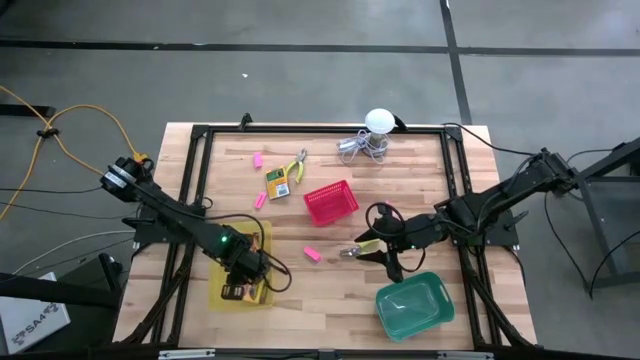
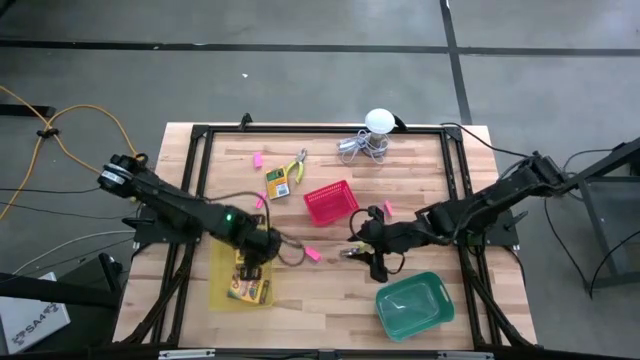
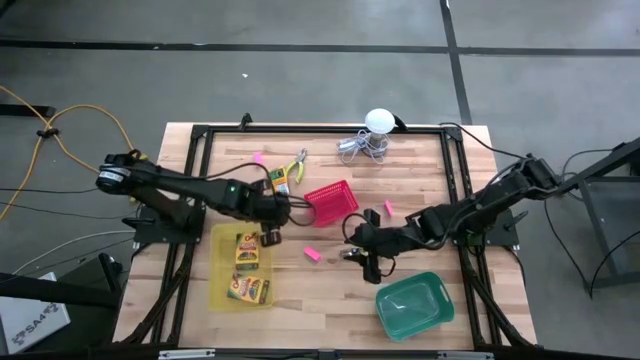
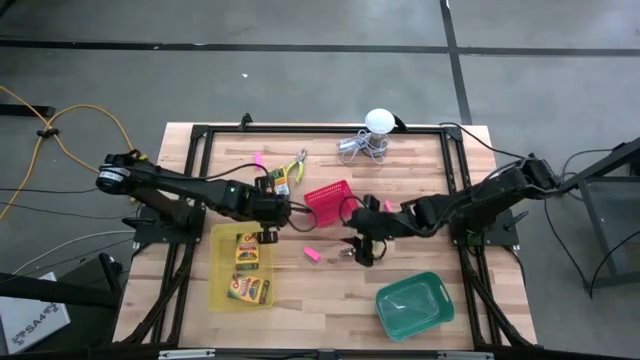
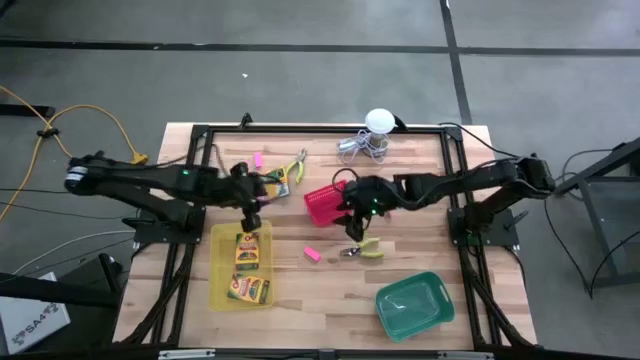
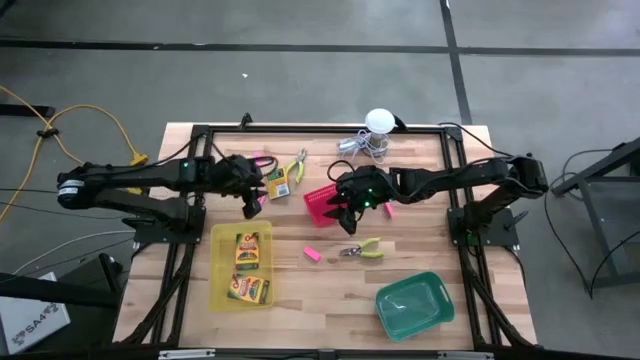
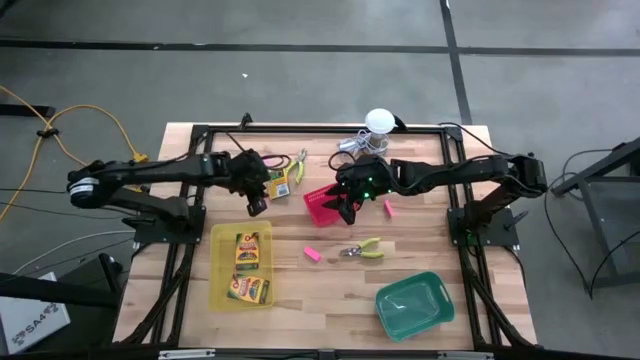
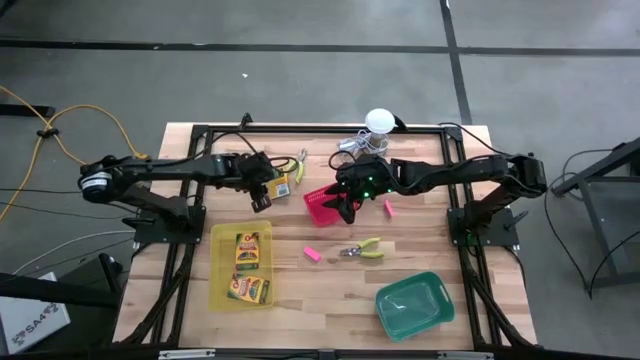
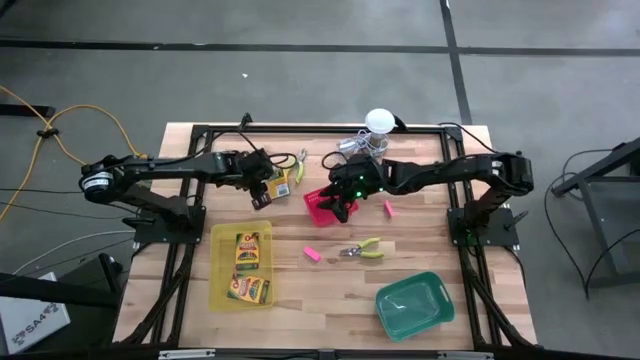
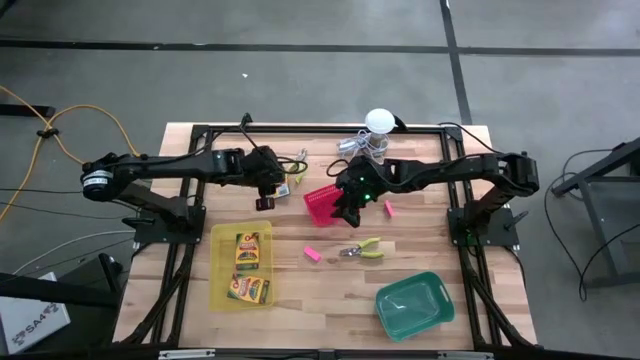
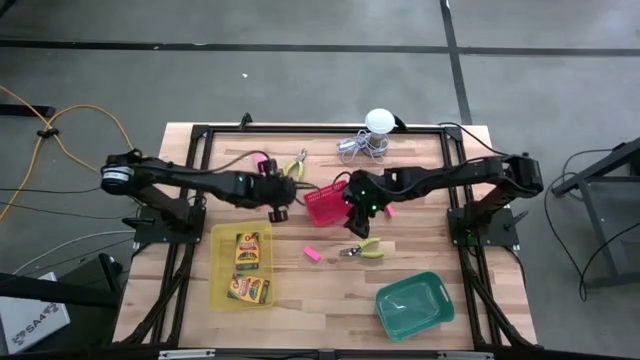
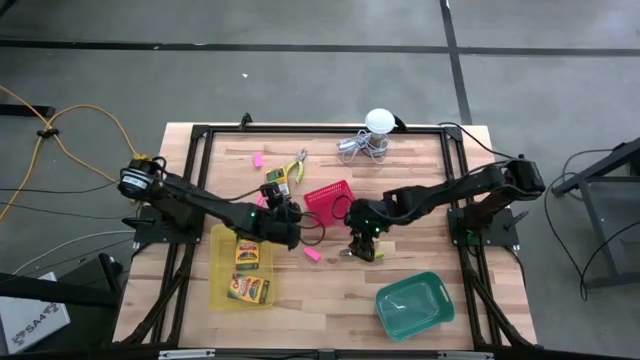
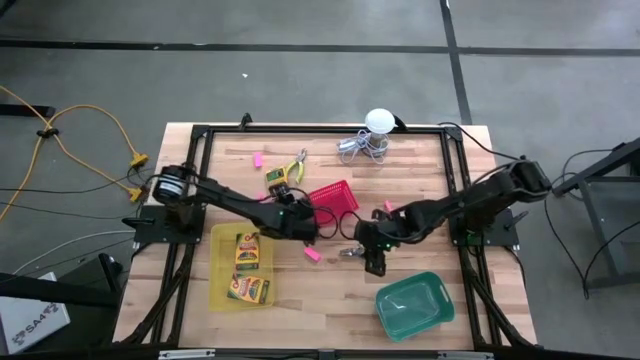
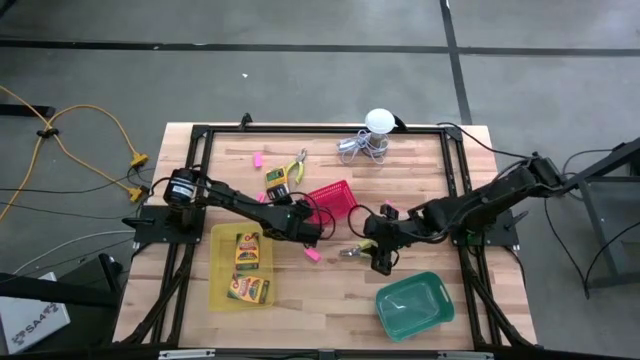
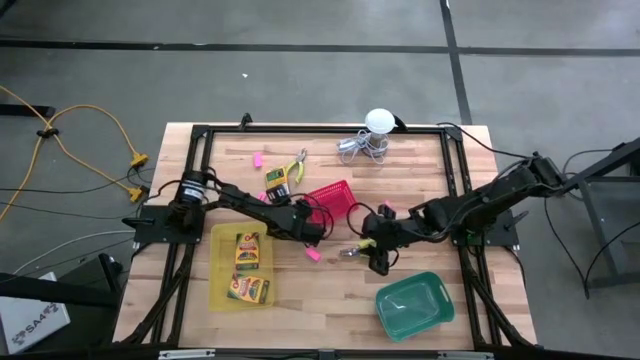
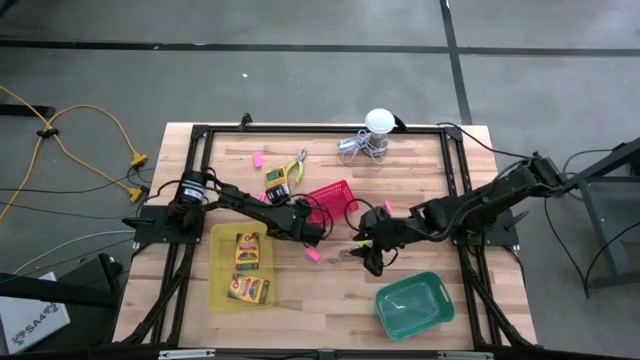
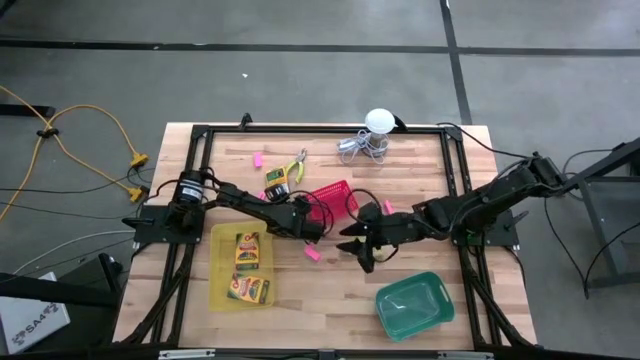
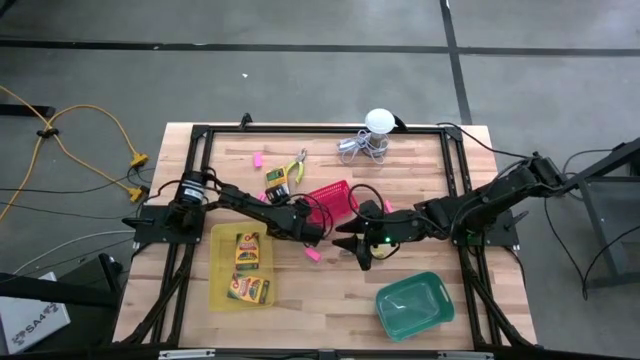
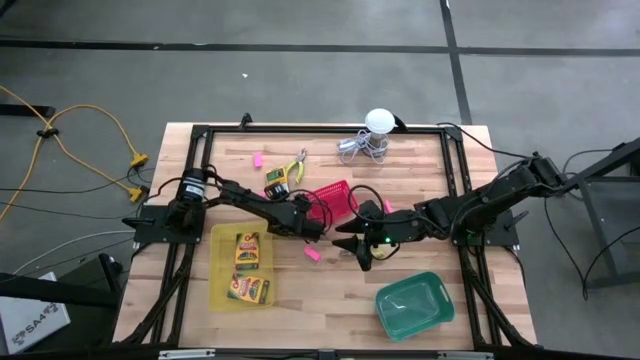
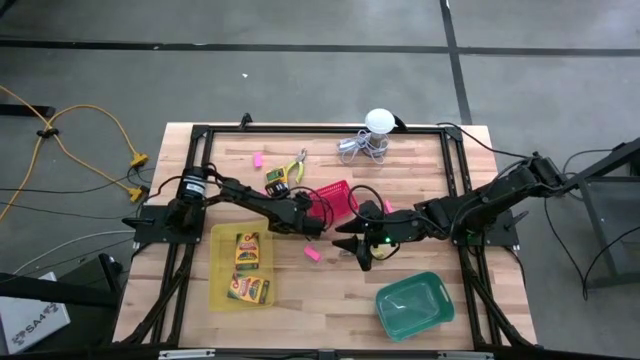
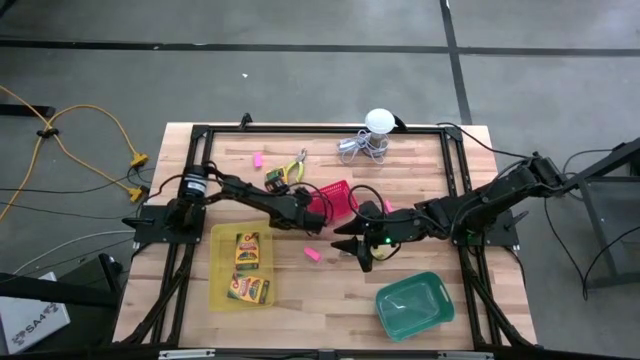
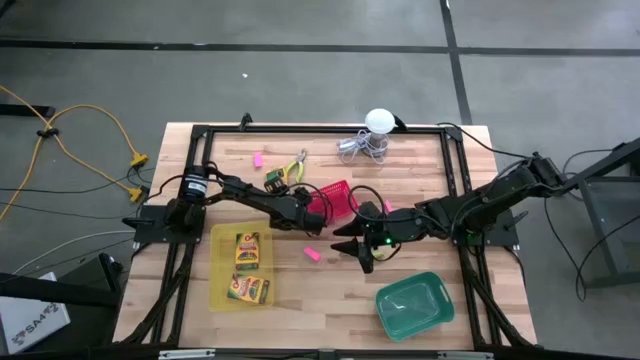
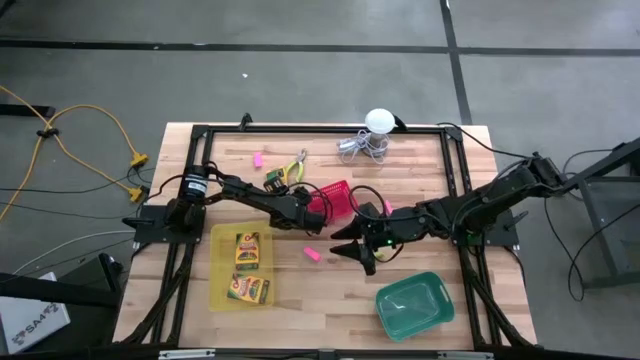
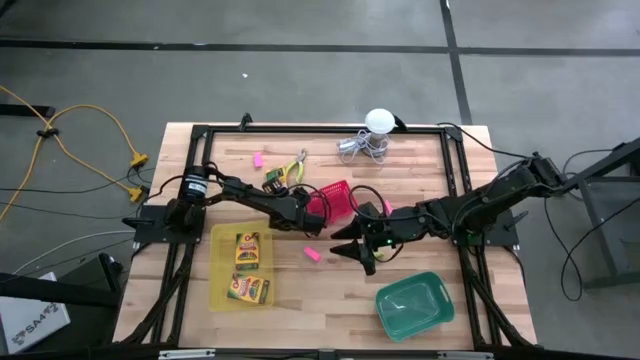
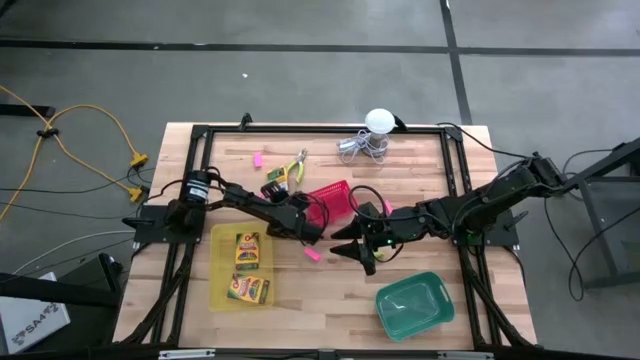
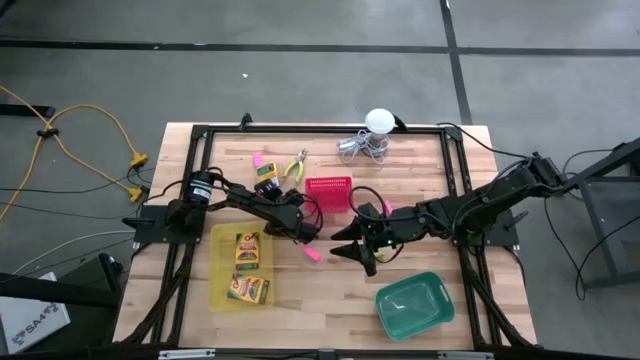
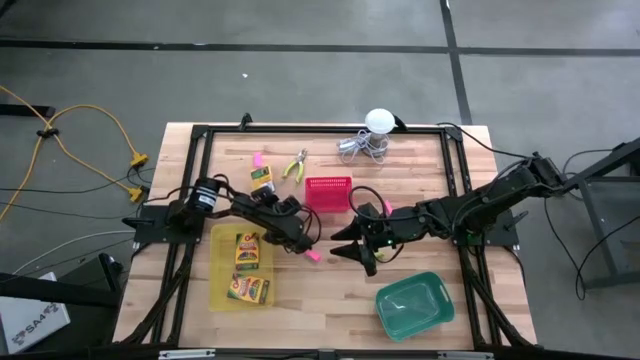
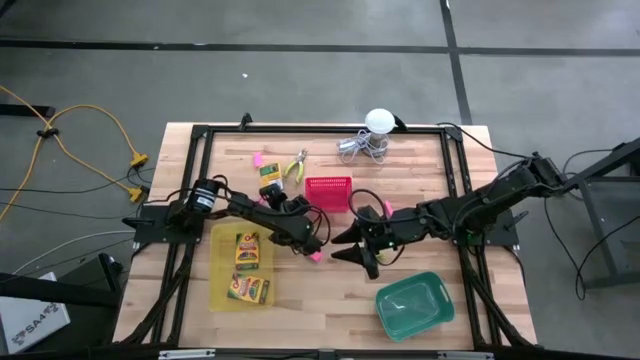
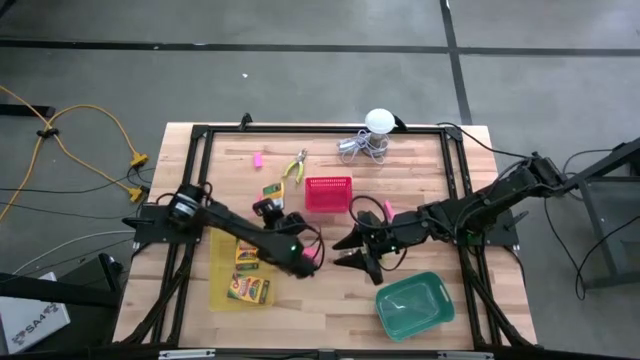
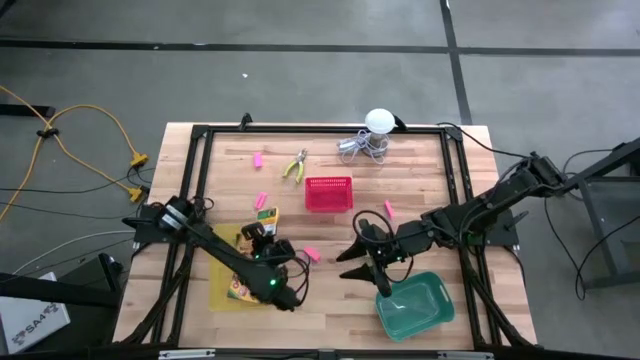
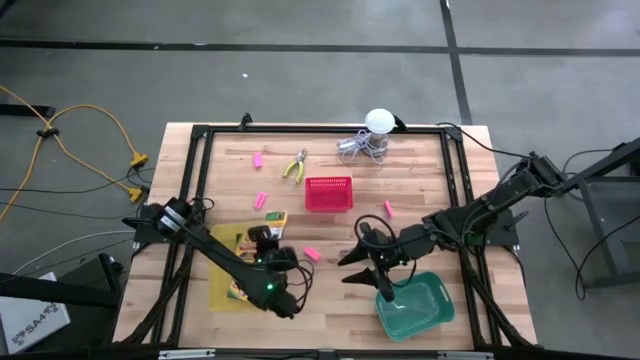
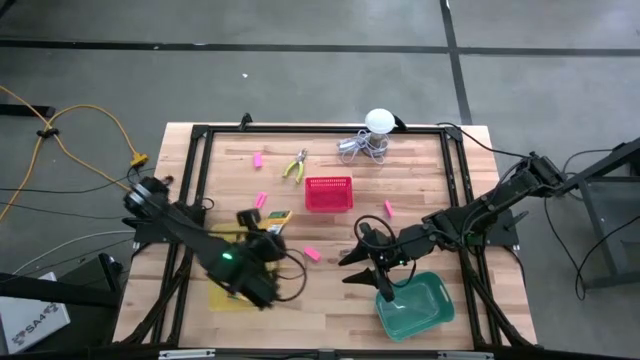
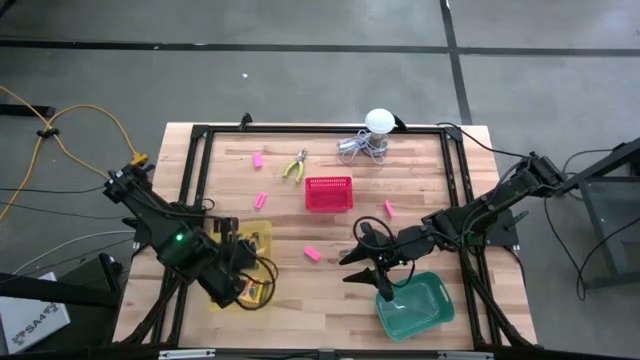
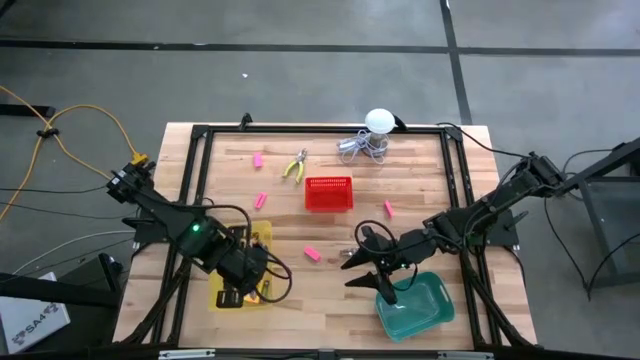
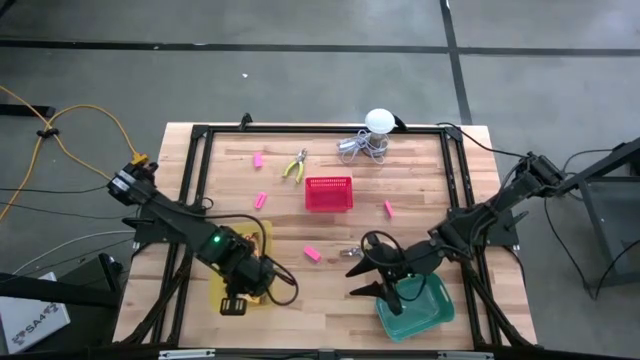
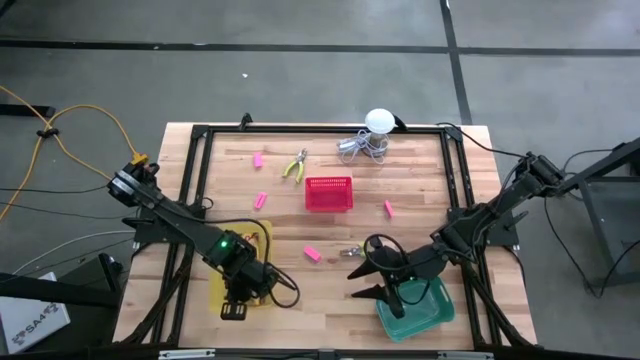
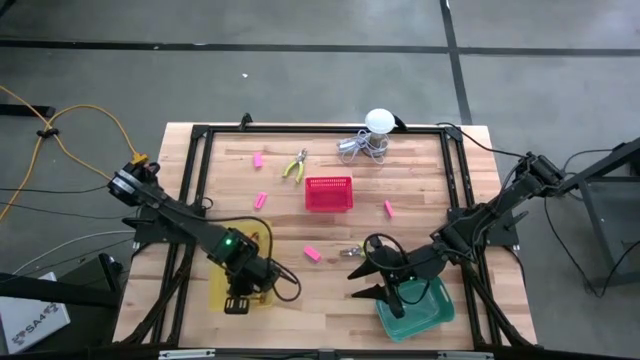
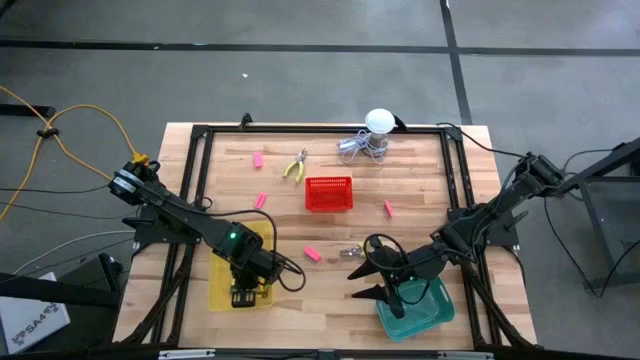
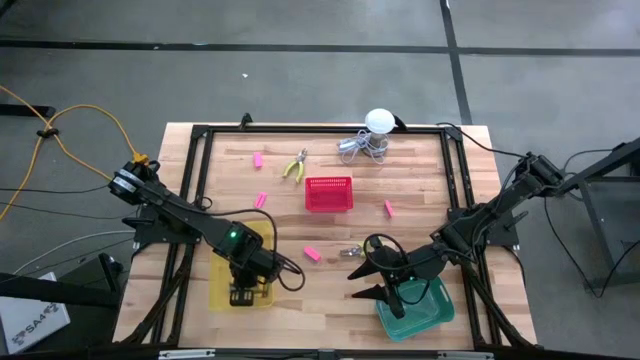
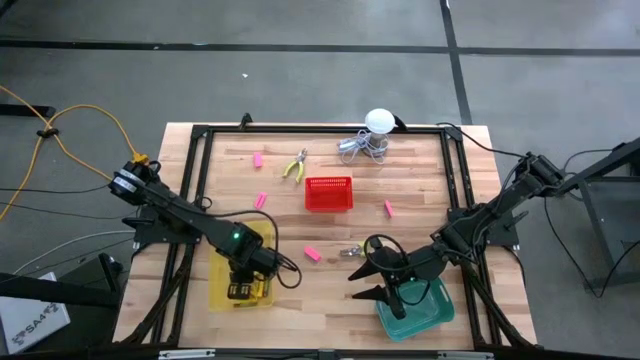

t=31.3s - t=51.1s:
Task: Pick & Place School Supplies
Put the yellow box of crayons into the yellow bin

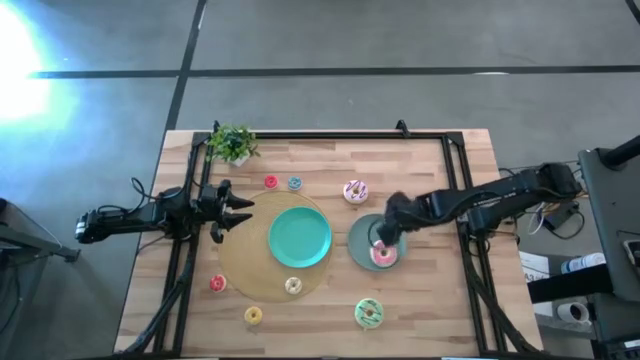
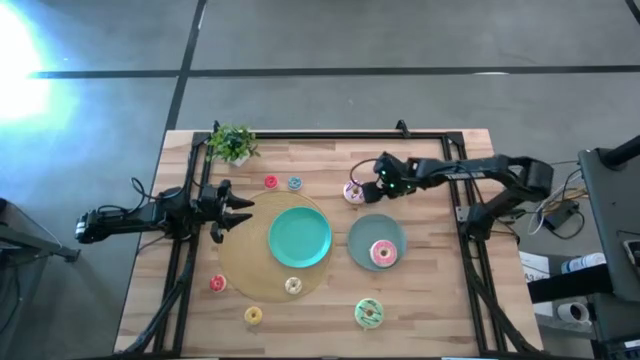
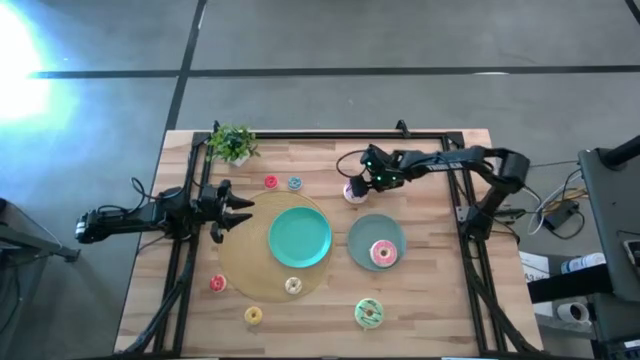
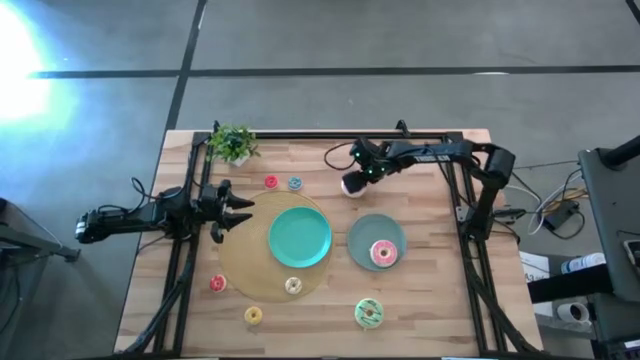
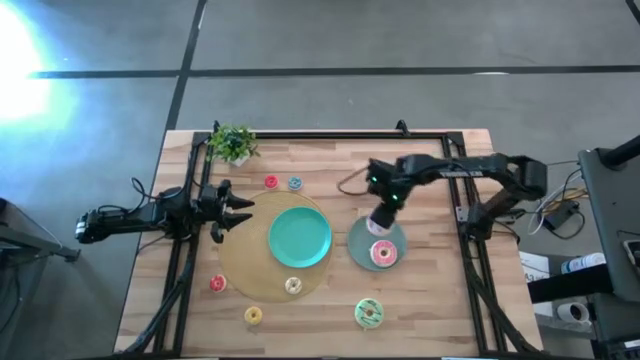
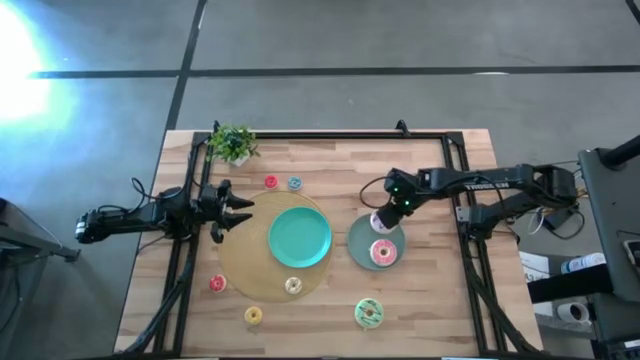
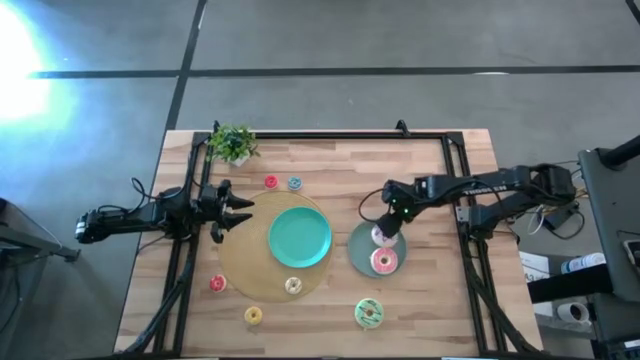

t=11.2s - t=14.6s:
Task: Pick & Place donuts
Put the large purple donut on the right plate
